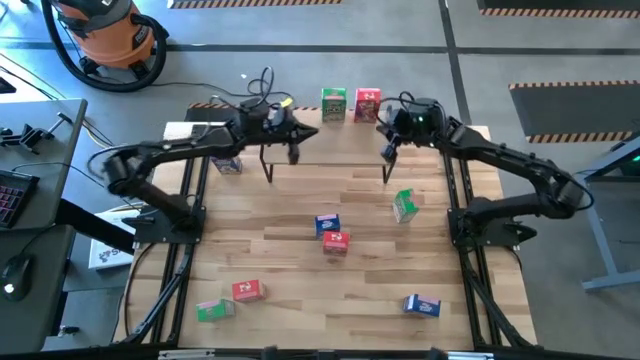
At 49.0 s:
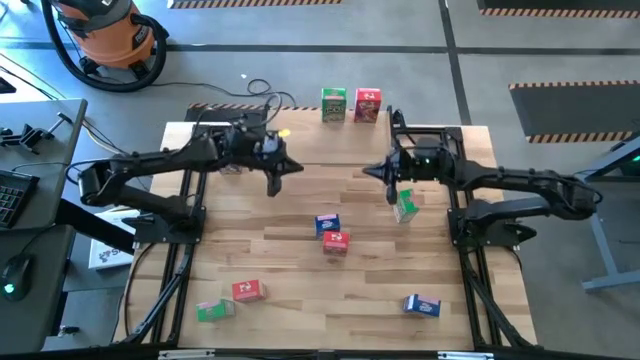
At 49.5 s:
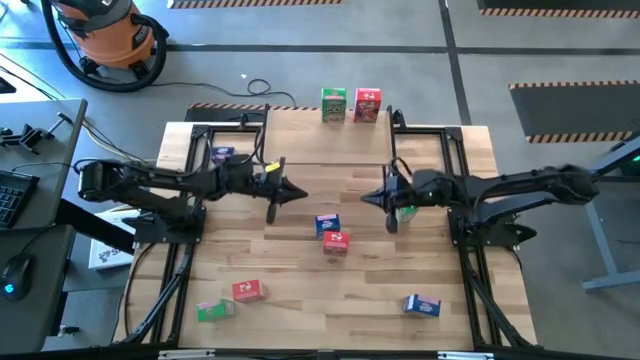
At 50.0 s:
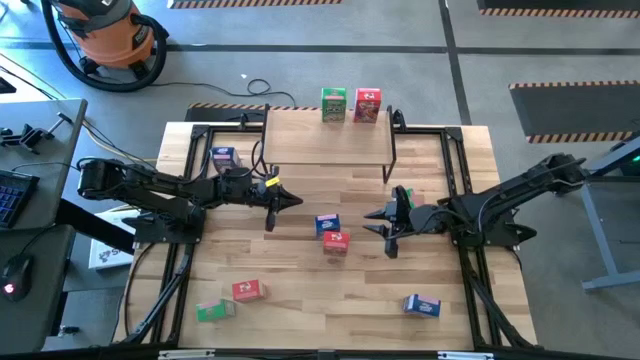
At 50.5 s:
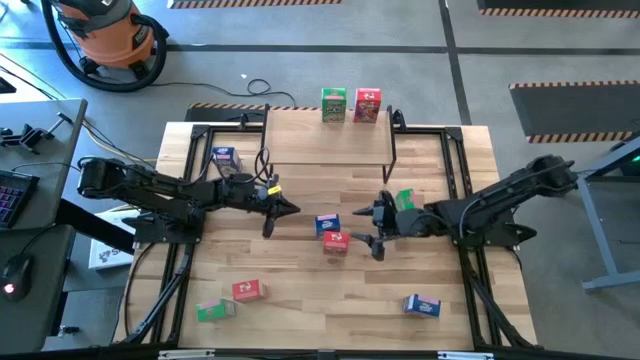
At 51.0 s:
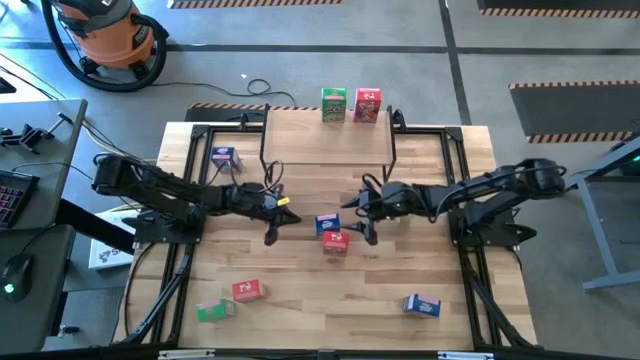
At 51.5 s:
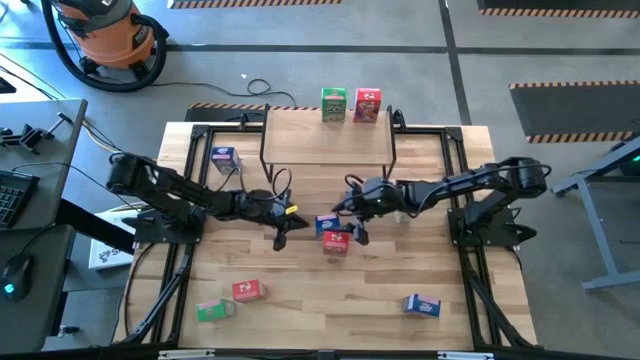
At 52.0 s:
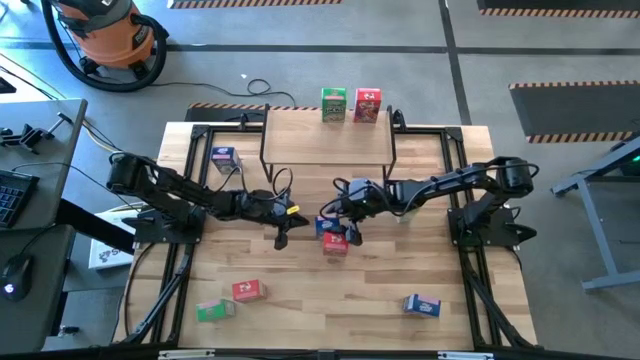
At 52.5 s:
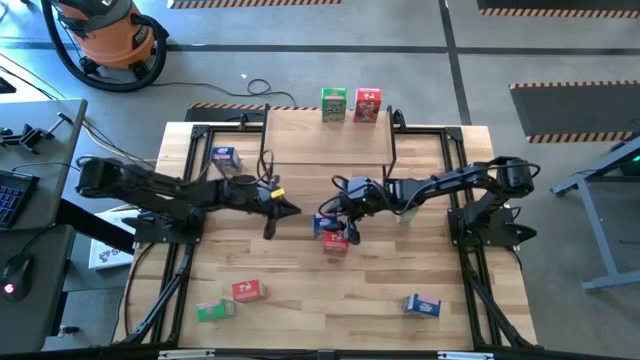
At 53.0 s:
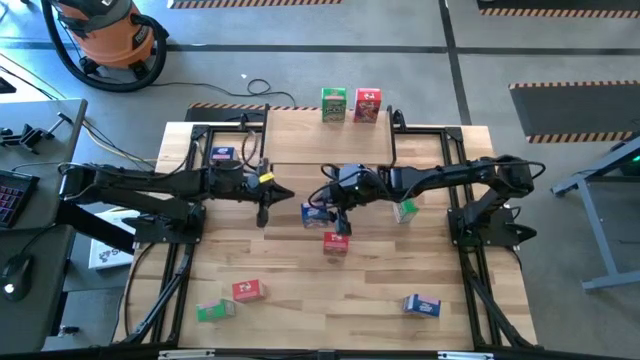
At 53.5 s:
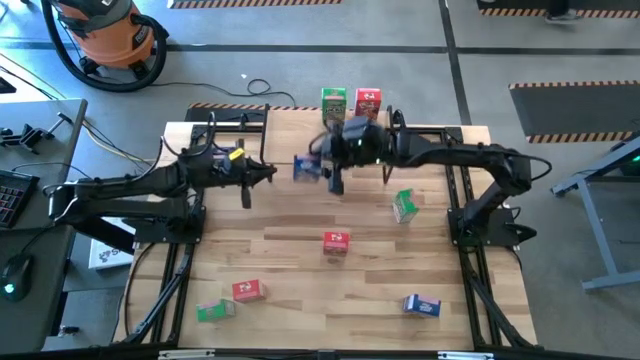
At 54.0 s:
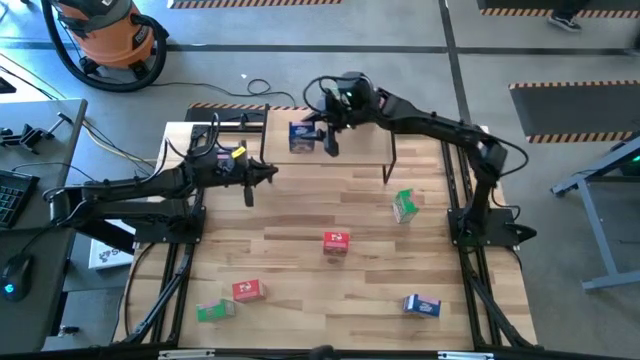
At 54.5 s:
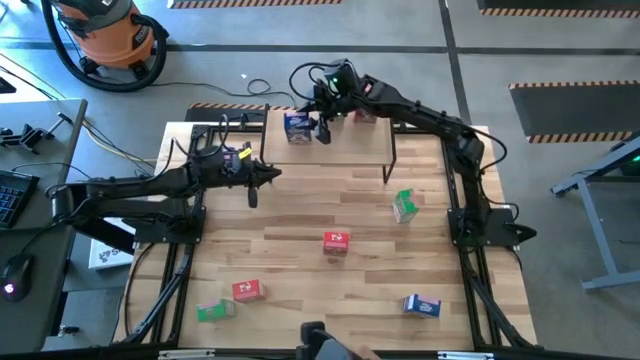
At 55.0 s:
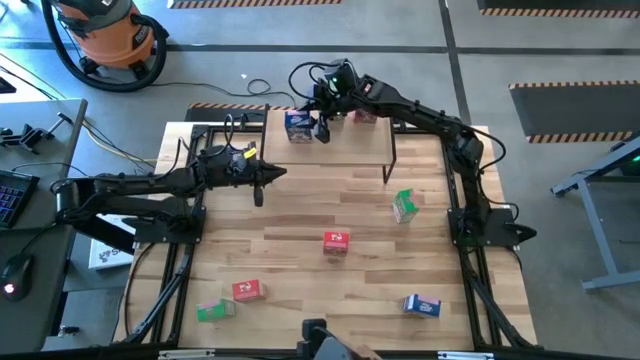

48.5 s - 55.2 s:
Task: Stack cereal on shelf
Put the middle blue cereal on the shelf

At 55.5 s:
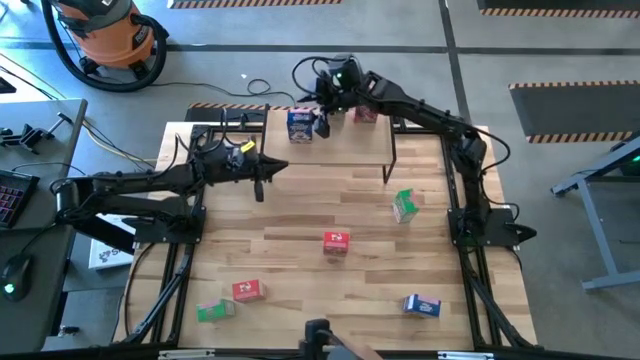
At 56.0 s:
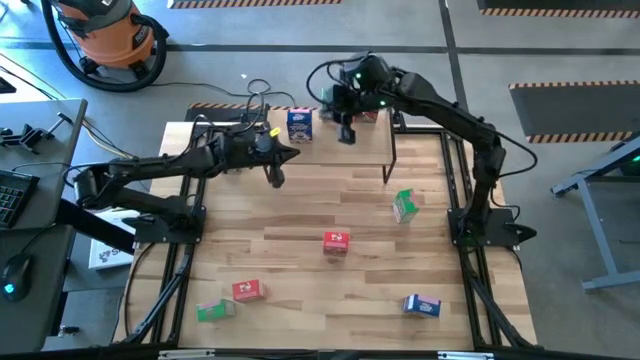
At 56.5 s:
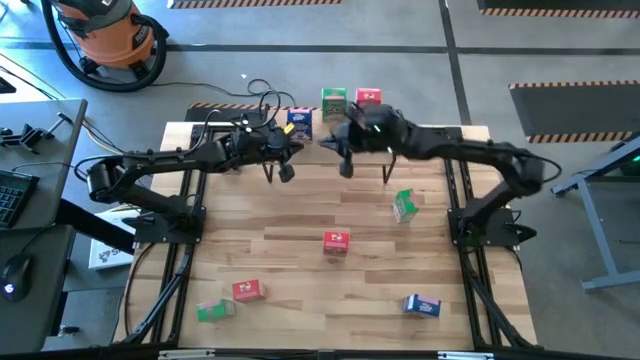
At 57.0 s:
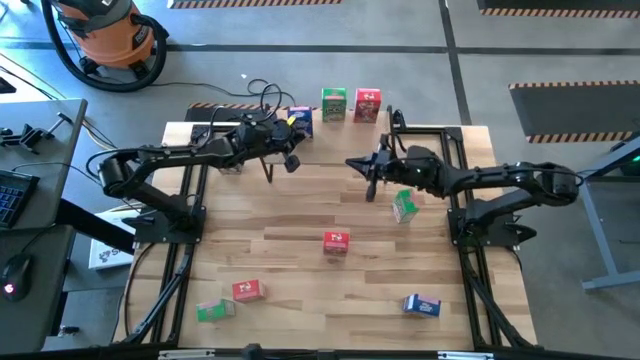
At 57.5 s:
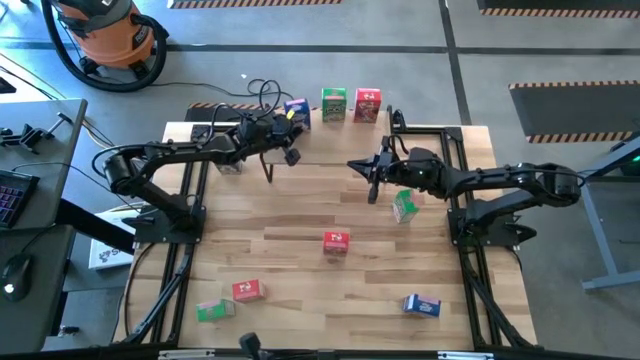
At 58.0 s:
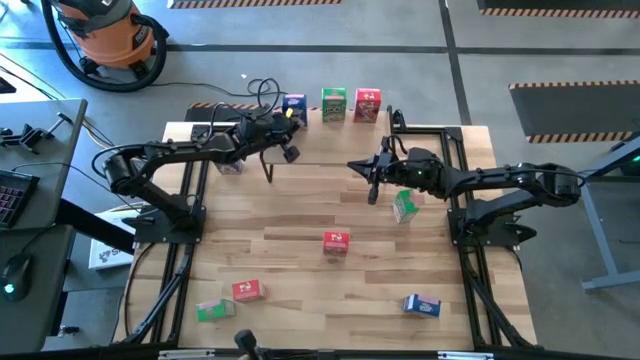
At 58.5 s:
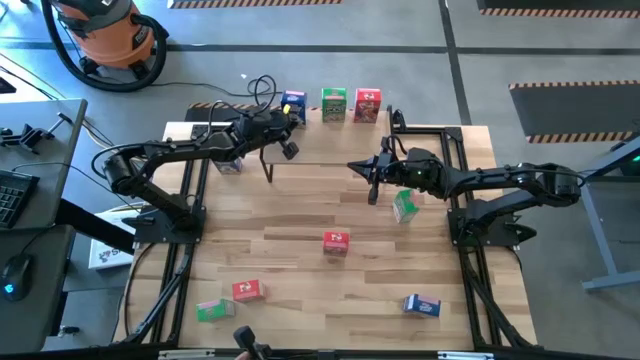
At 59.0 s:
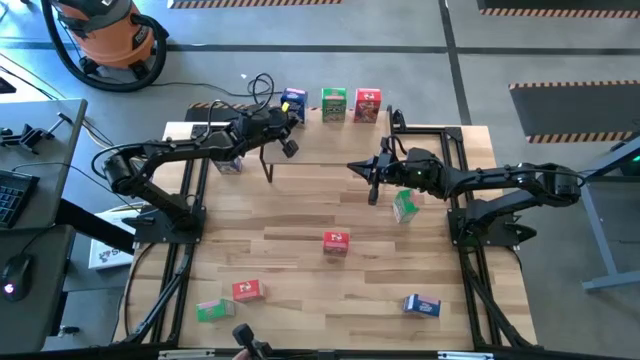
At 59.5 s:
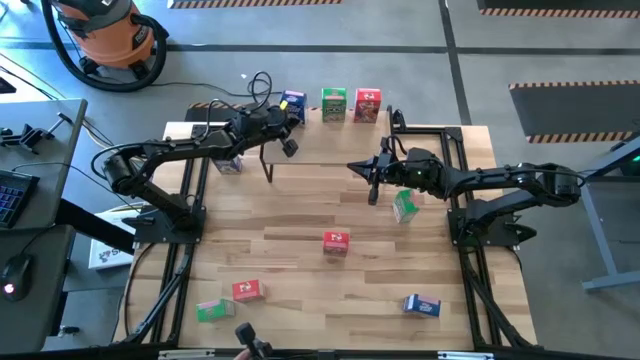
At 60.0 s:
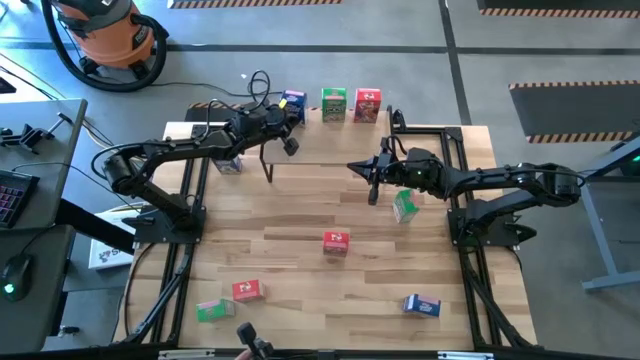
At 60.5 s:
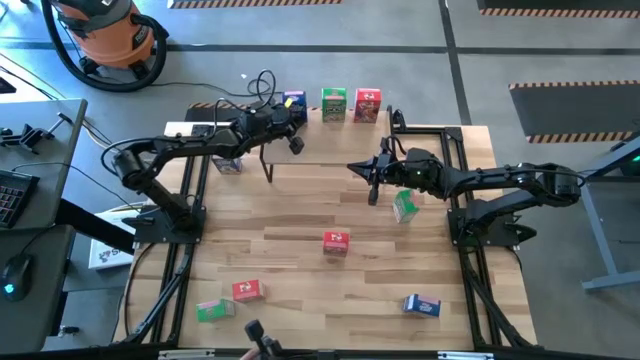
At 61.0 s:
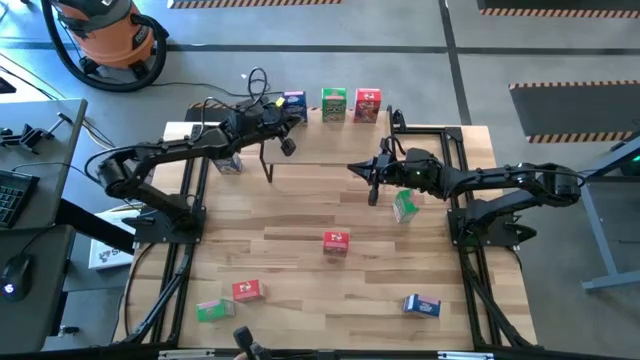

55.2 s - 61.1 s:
Adjust the blue cereal box

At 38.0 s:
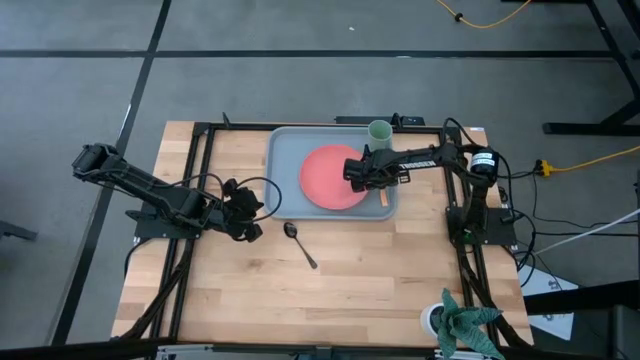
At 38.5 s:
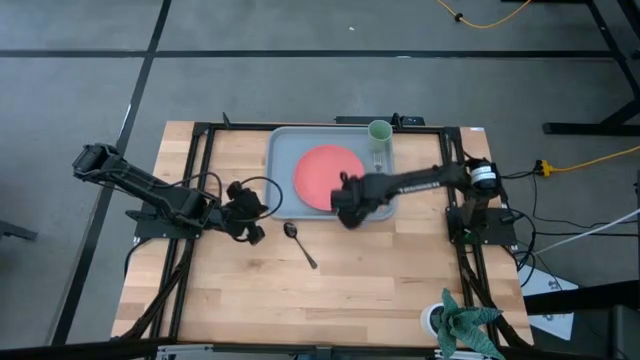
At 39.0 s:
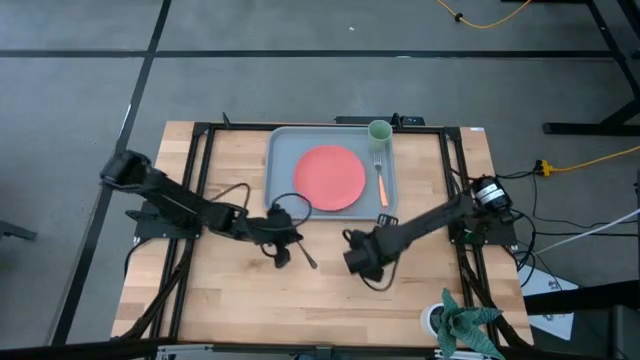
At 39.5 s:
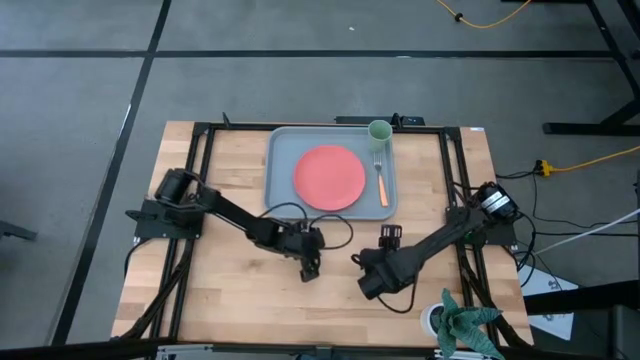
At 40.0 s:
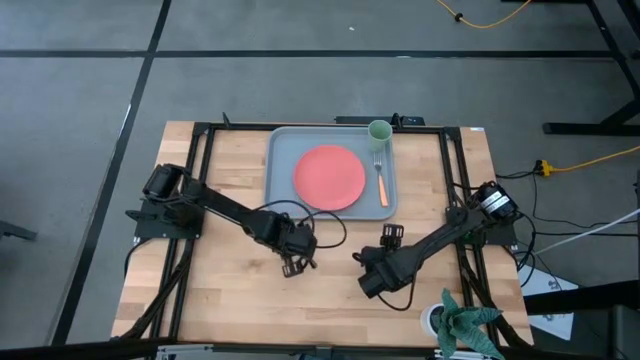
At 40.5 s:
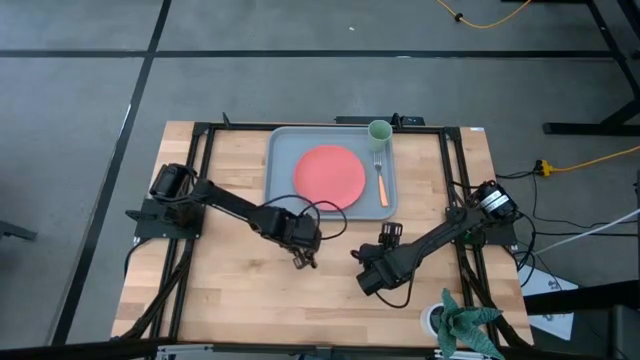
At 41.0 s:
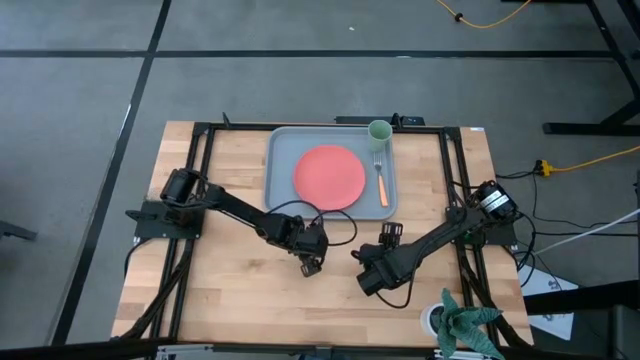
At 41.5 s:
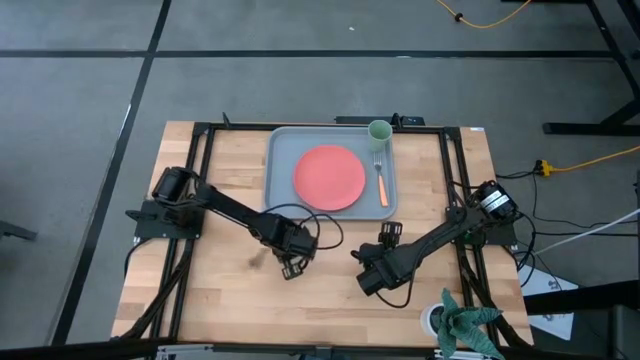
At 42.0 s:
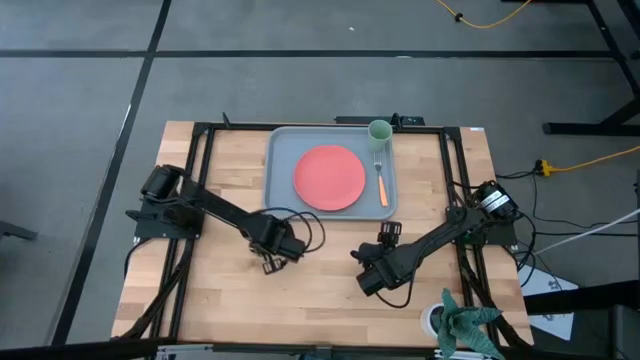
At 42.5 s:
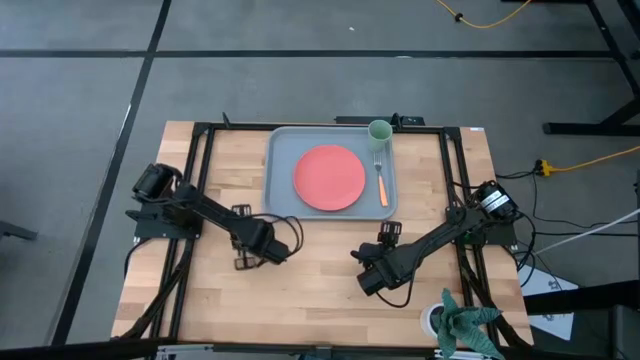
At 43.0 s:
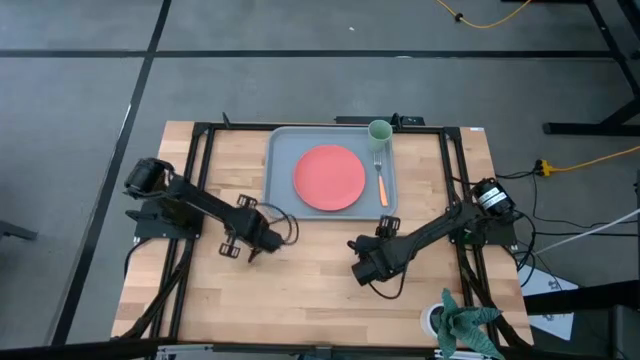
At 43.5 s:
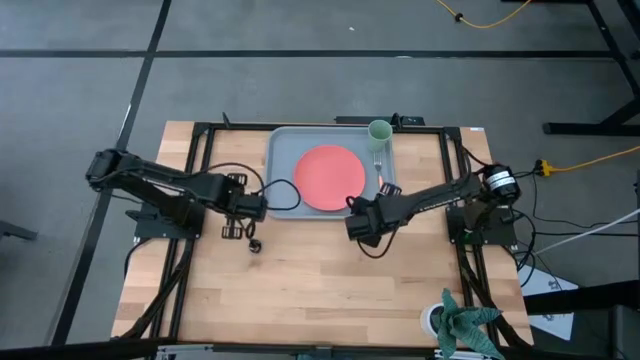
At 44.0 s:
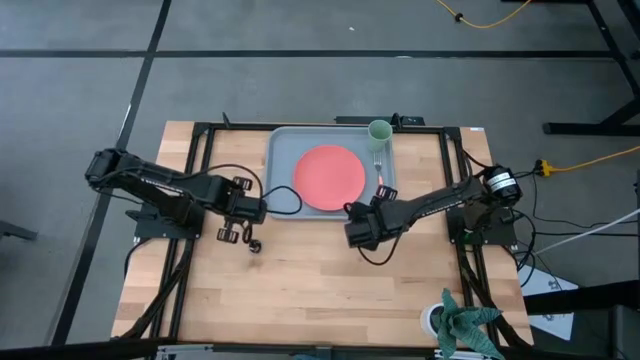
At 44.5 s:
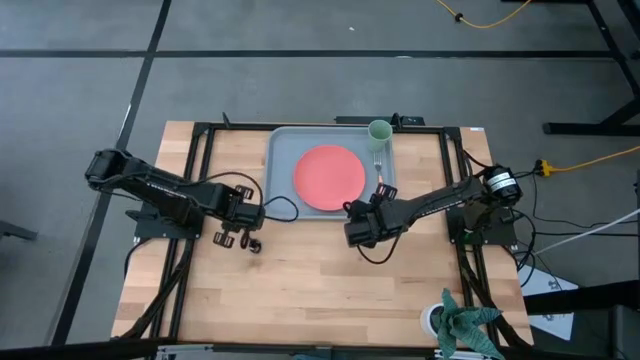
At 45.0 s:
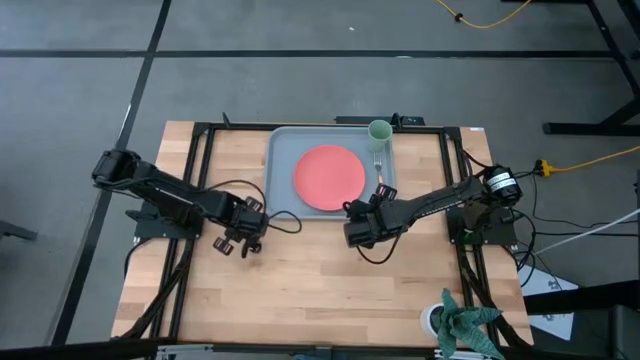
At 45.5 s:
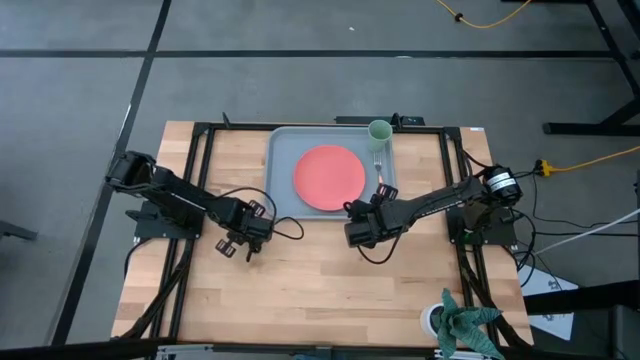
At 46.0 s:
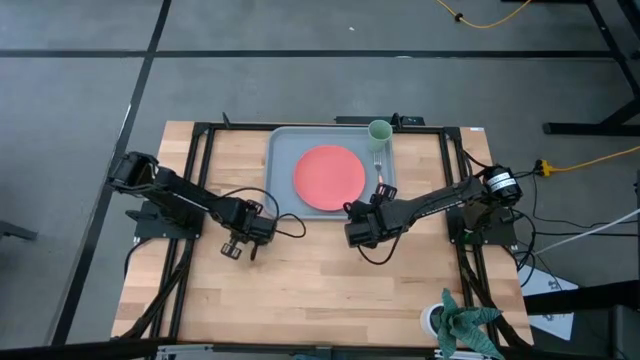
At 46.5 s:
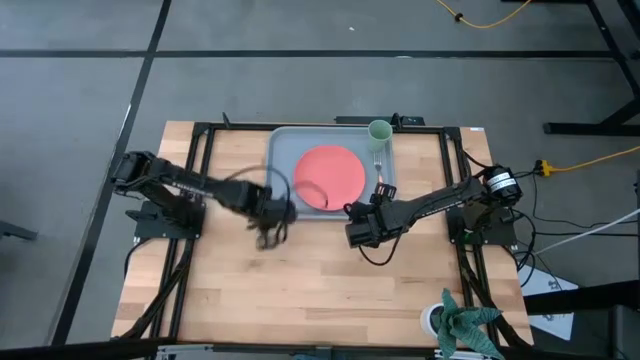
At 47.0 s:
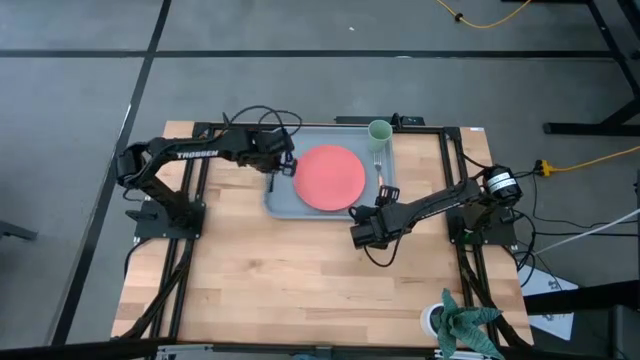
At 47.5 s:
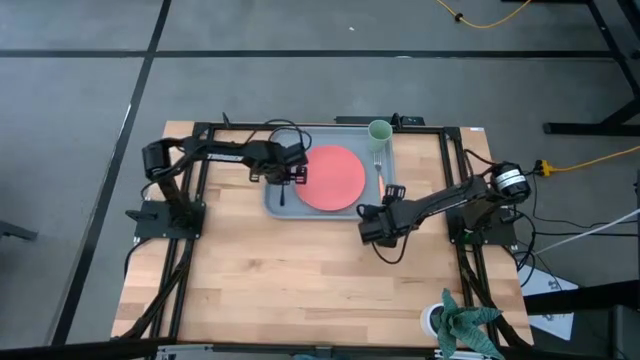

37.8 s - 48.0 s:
Task: Pick and place plate/cup/fork/spoon on tray
Put the black spoon on the blue tray on the left side of the orange plate
